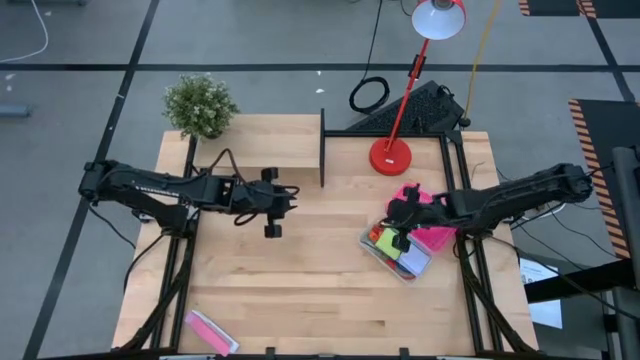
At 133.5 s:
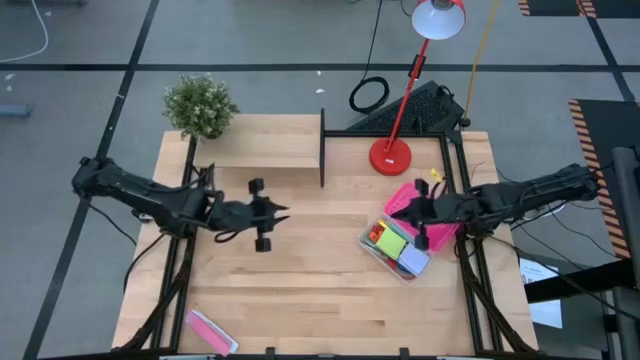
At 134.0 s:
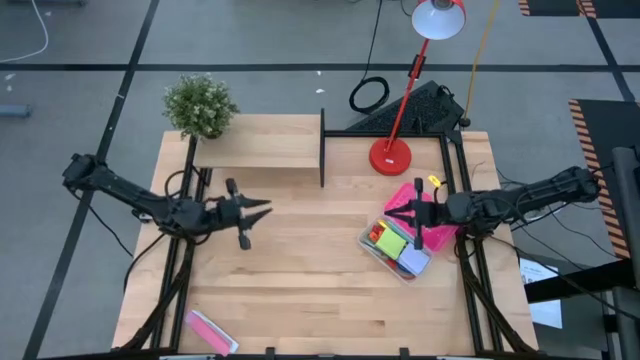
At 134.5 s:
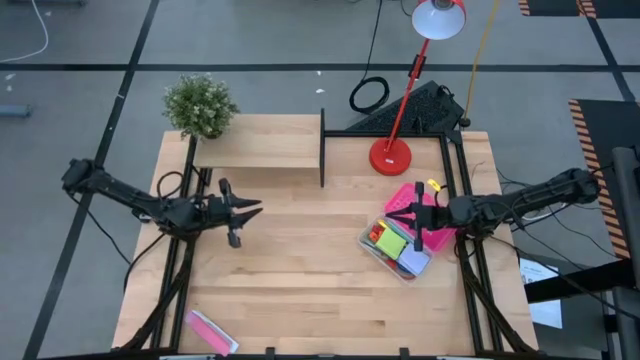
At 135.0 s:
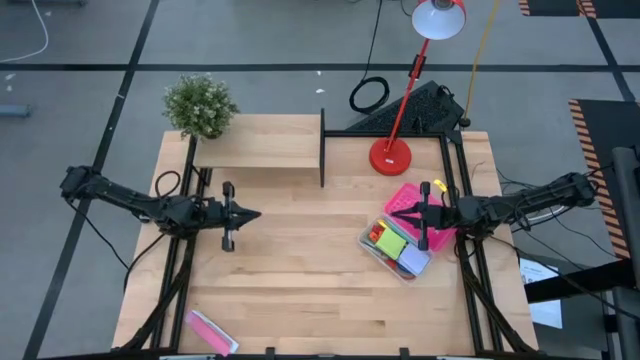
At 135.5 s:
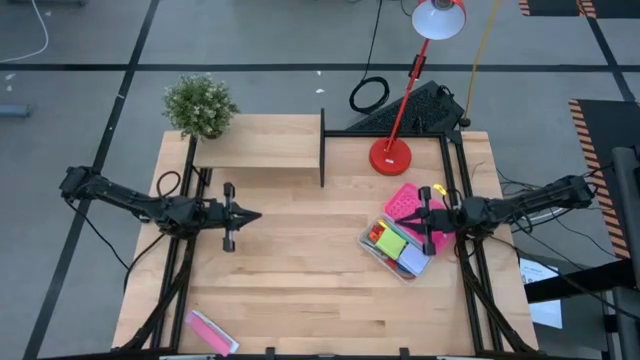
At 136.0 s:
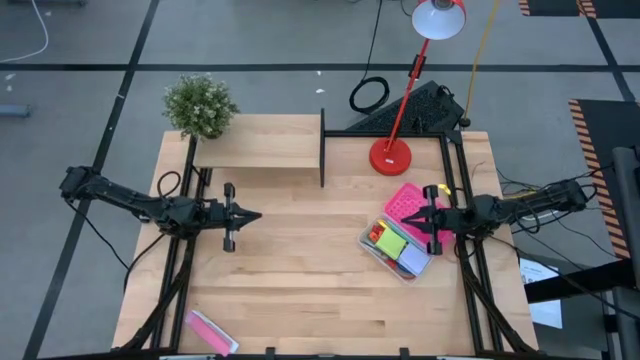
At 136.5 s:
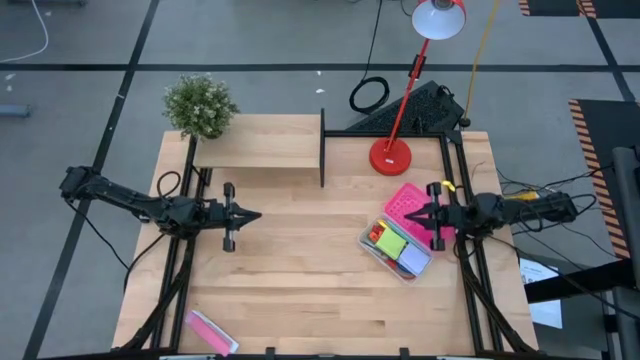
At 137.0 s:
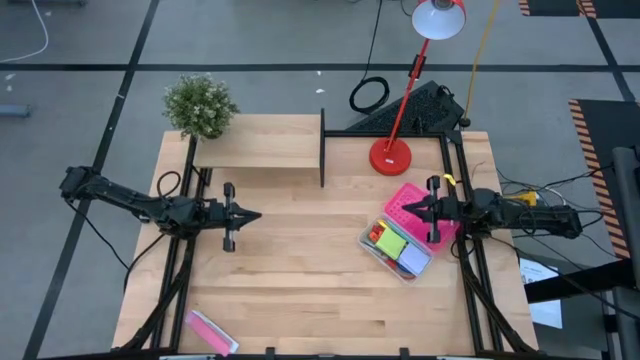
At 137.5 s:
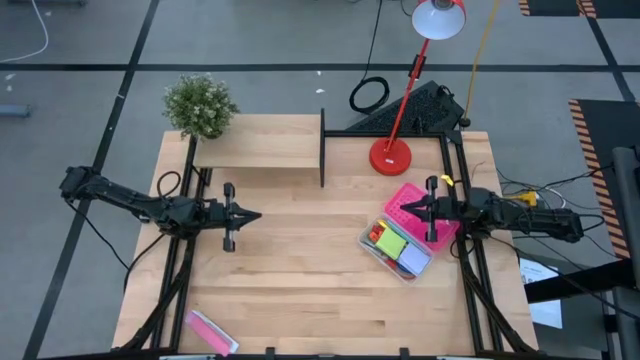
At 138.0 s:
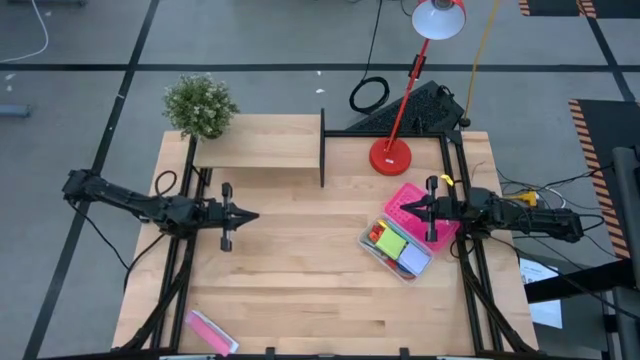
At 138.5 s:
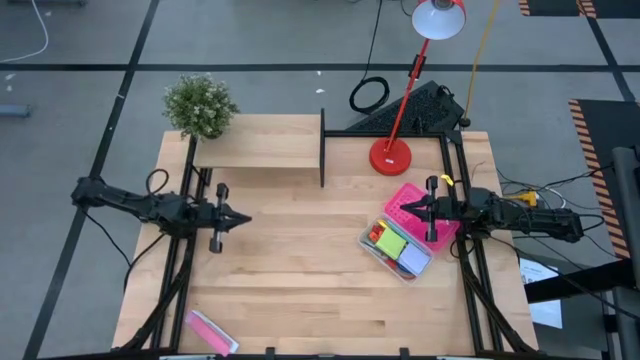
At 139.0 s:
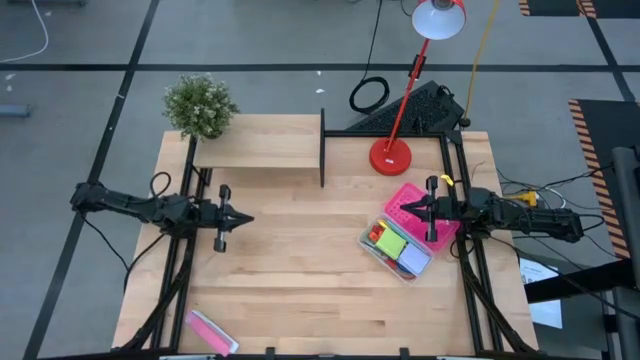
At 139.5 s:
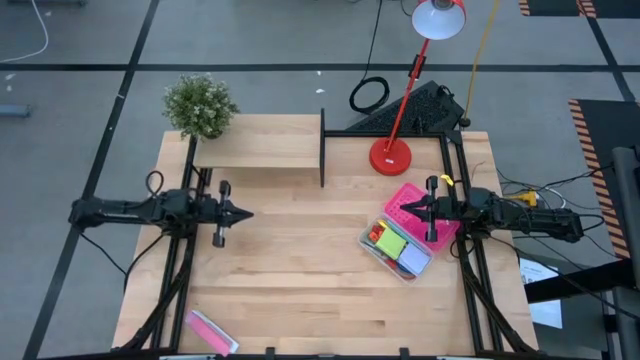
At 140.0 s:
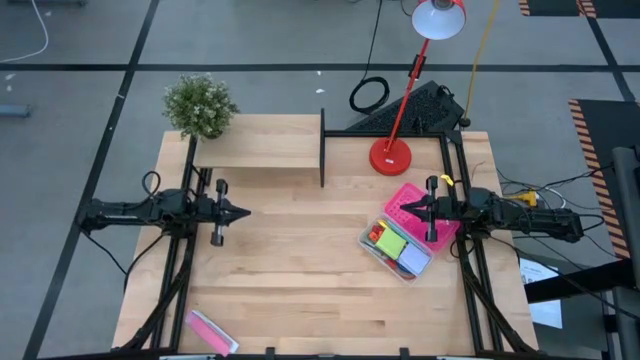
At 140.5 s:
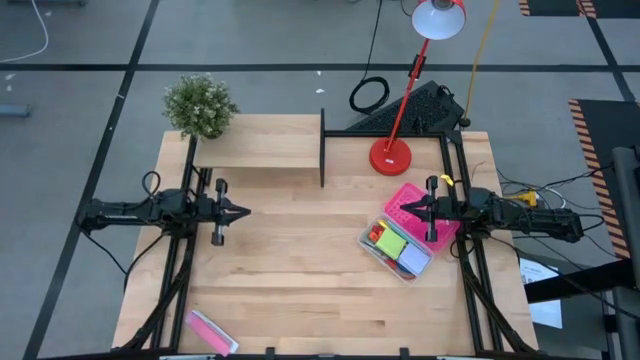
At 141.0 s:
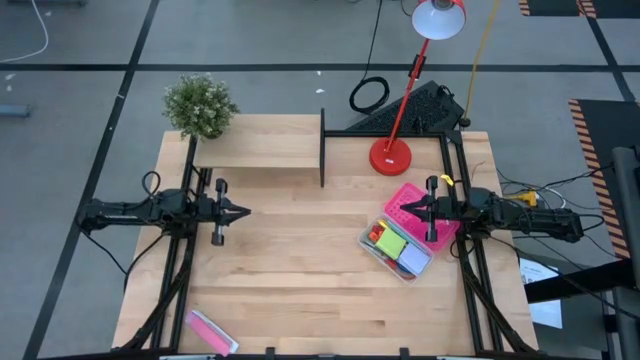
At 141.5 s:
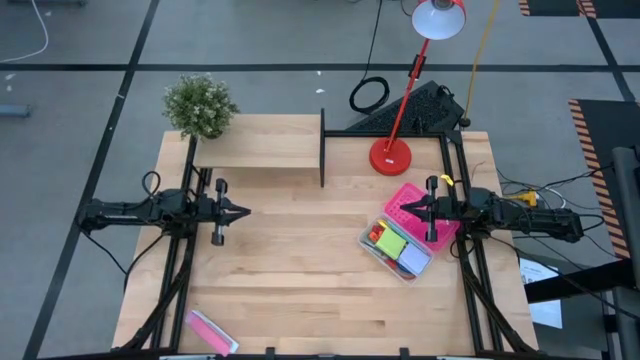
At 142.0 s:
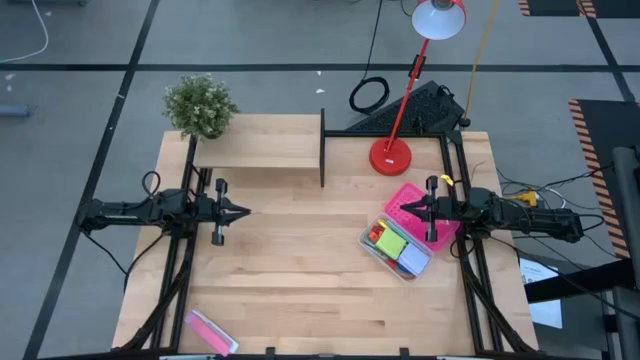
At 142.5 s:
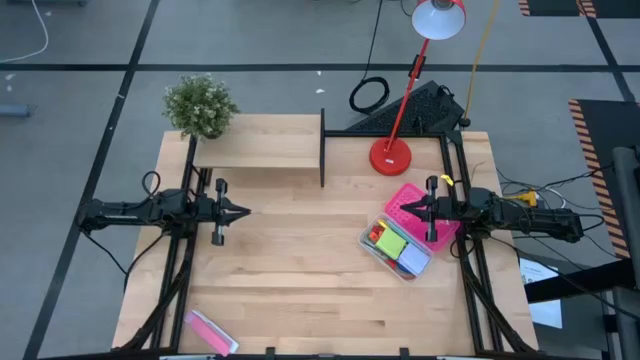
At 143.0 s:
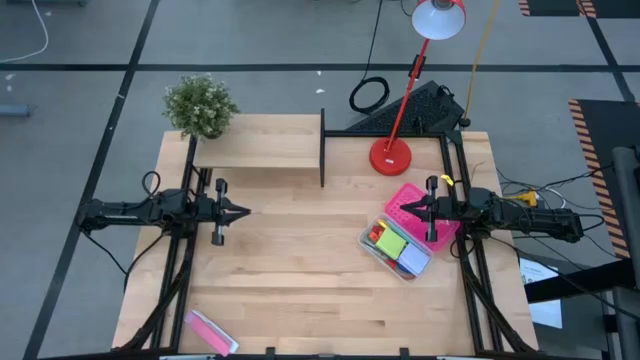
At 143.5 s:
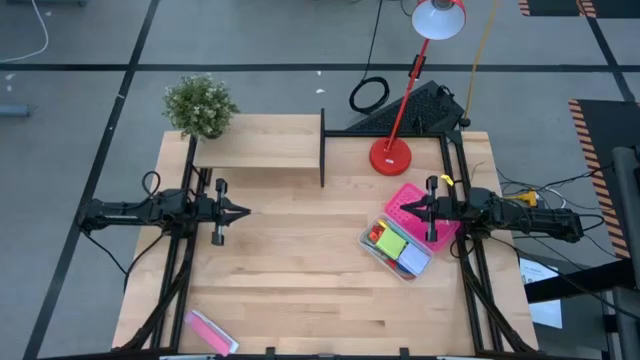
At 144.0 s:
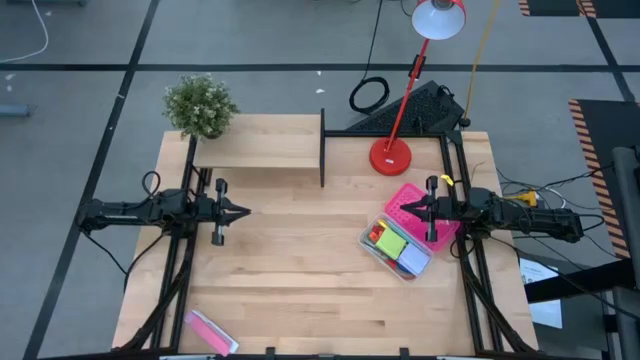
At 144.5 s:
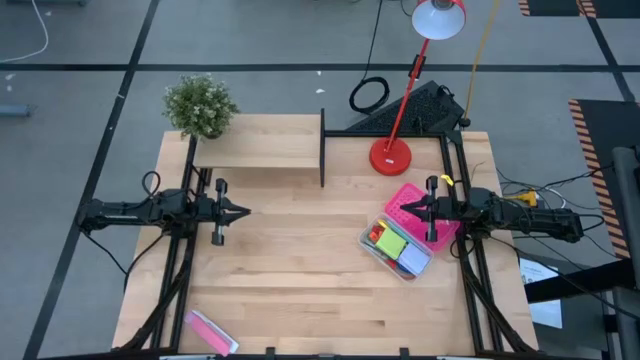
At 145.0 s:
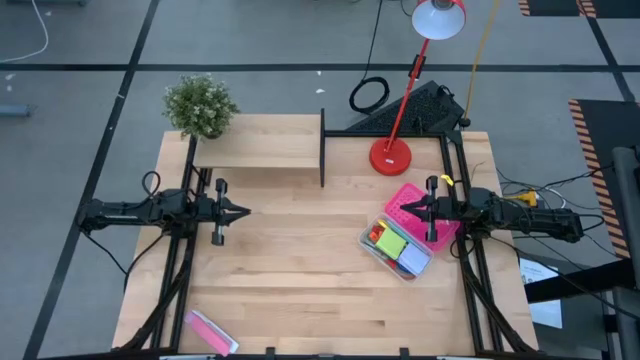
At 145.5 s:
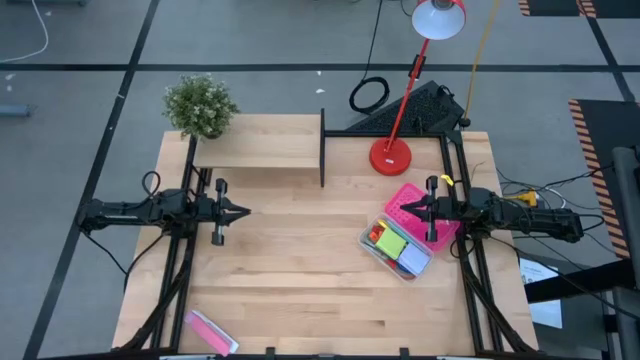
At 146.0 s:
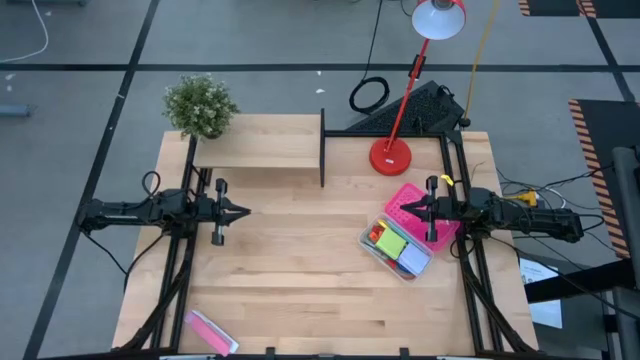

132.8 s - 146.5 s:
Task: Pack school essentials
Return to Home Position

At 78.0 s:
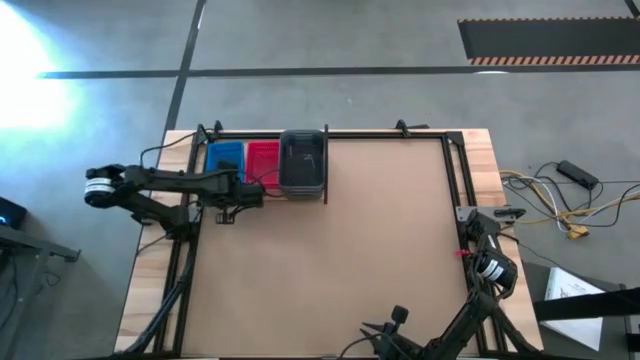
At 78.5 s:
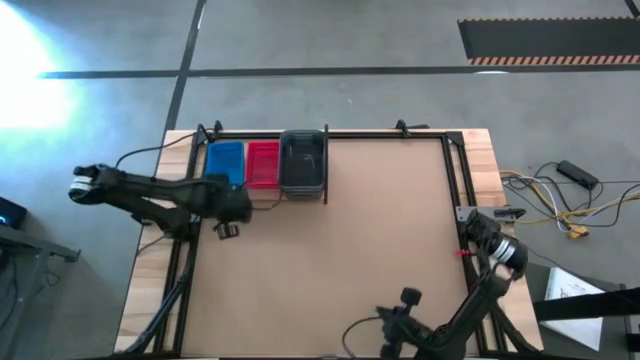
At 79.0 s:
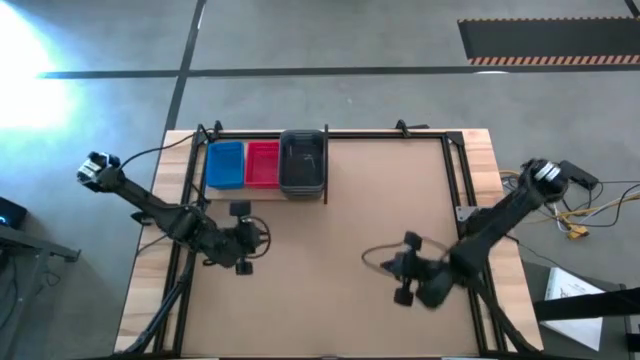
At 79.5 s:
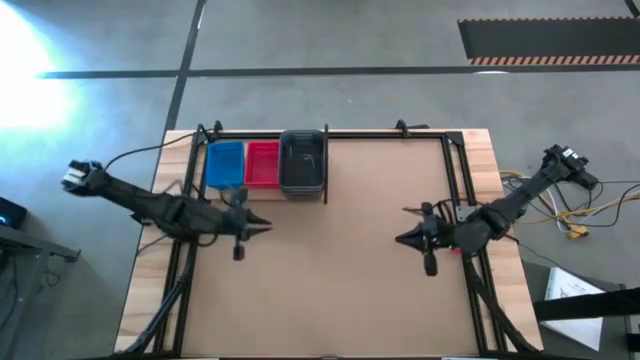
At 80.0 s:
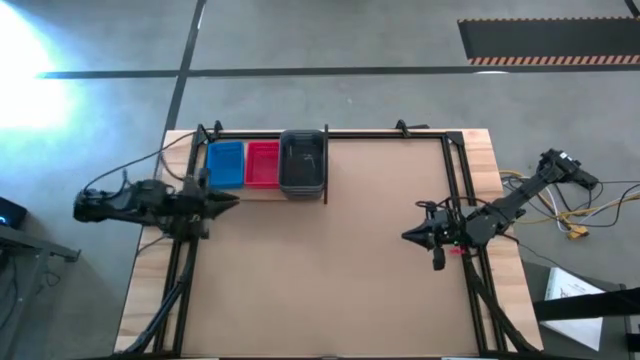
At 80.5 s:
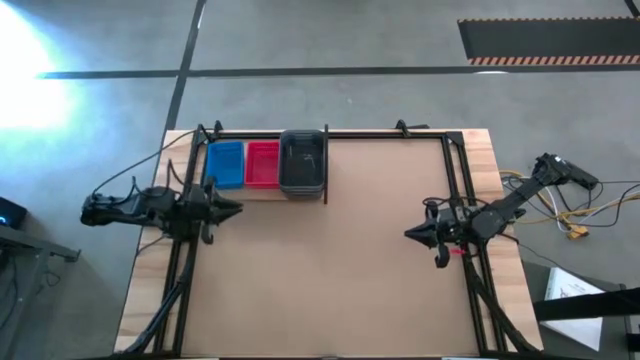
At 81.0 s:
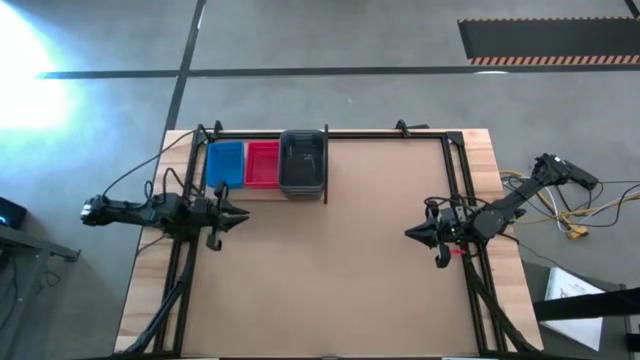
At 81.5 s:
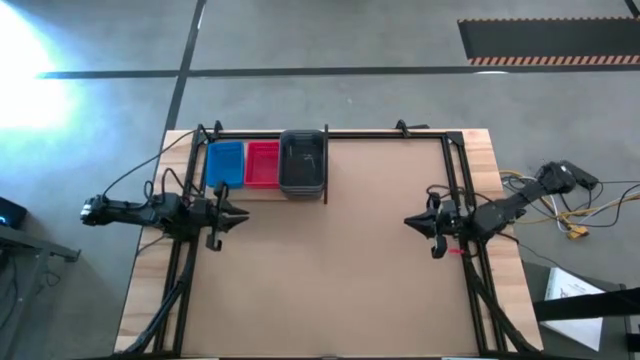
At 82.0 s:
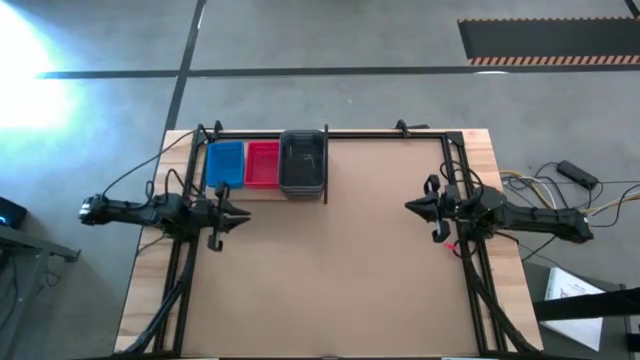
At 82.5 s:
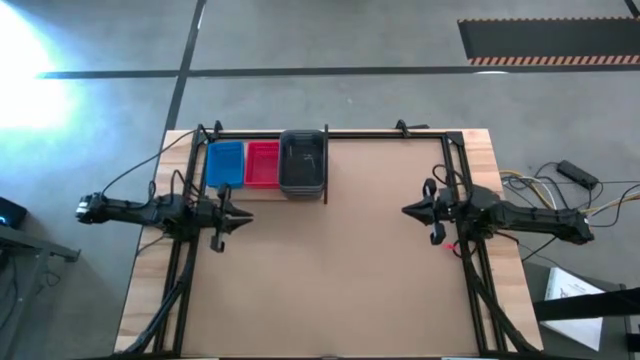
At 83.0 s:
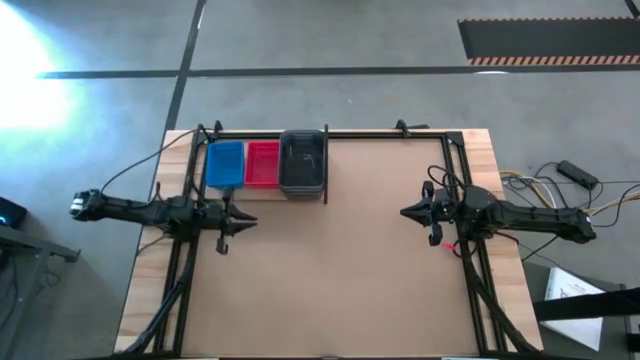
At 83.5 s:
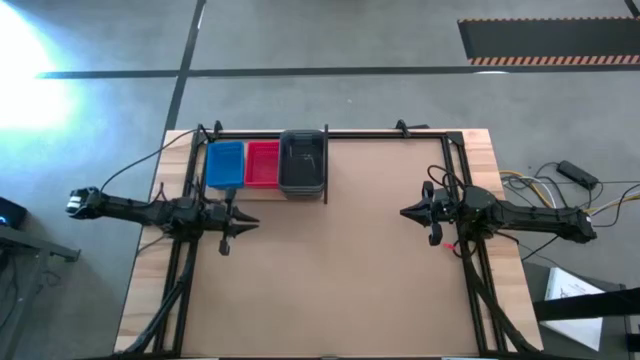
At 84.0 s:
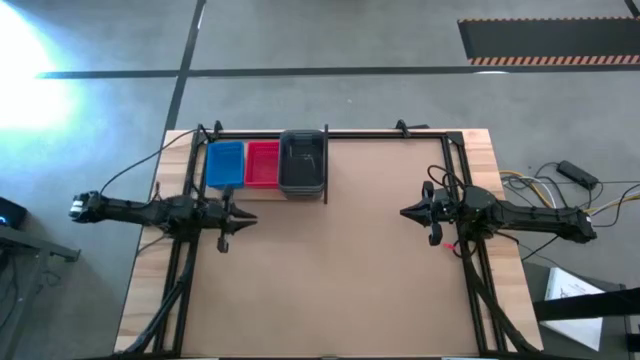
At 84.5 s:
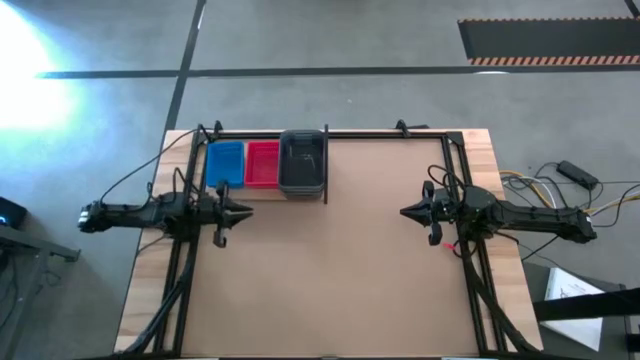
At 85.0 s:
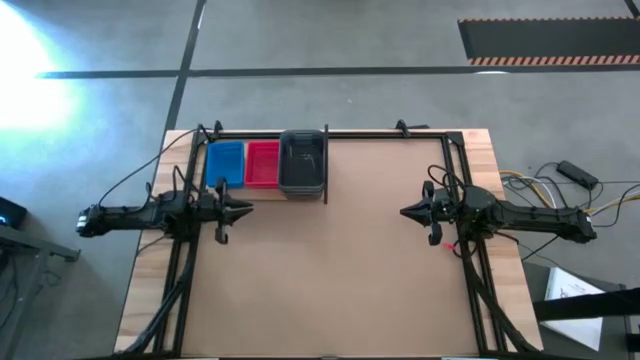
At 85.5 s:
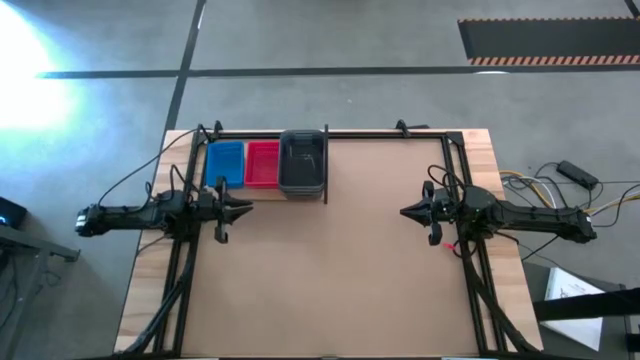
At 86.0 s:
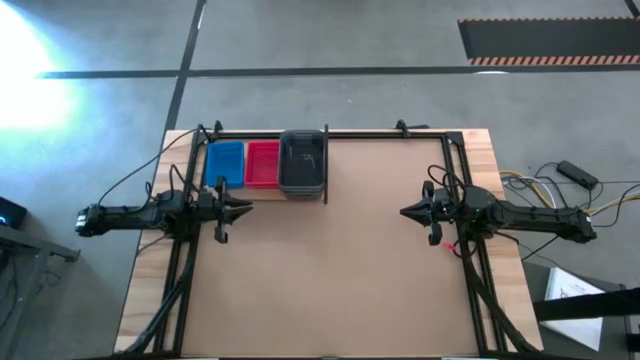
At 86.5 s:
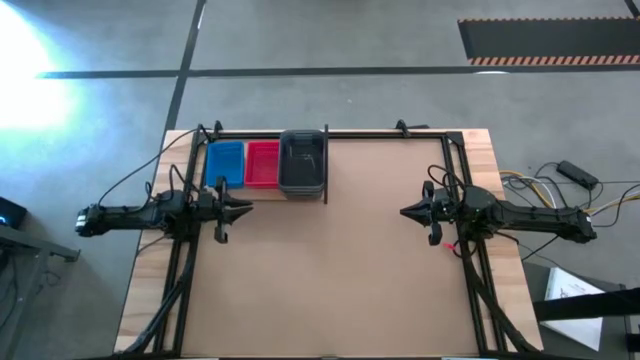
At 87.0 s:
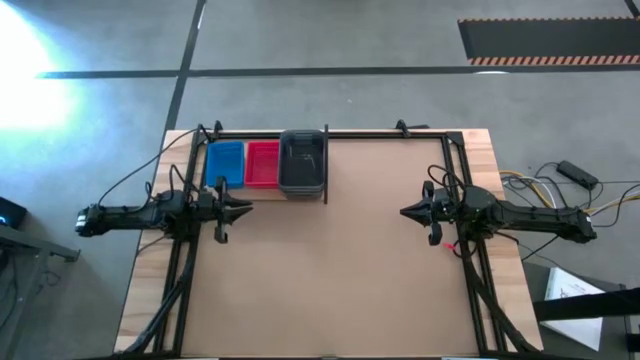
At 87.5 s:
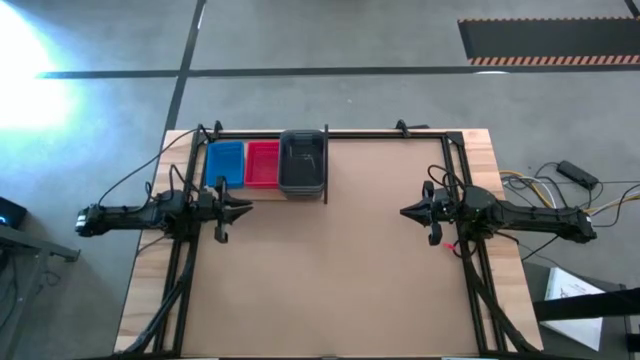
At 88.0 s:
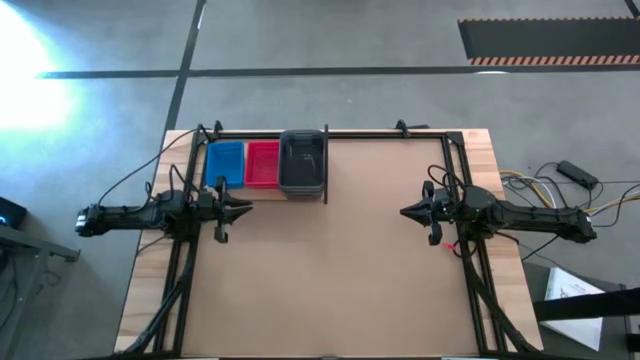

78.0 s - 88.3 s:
Task: Stack baskets on shelf by color
Return to Home Position
